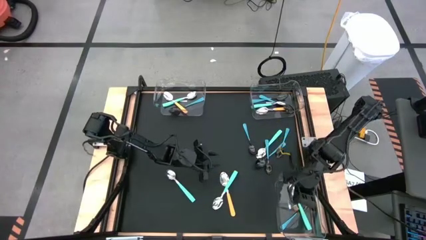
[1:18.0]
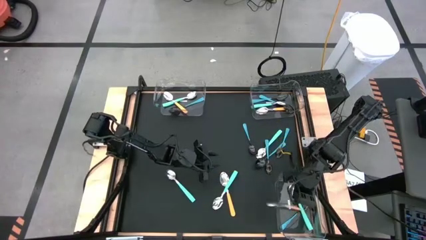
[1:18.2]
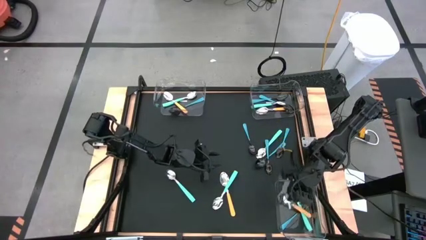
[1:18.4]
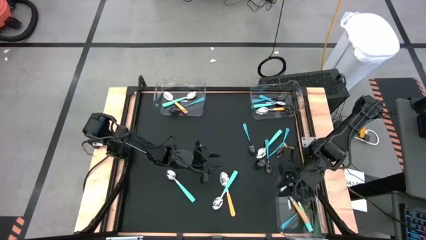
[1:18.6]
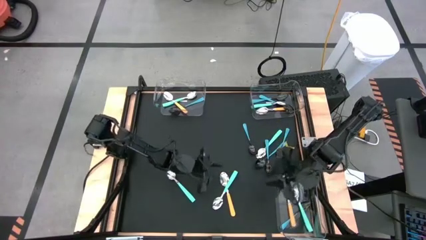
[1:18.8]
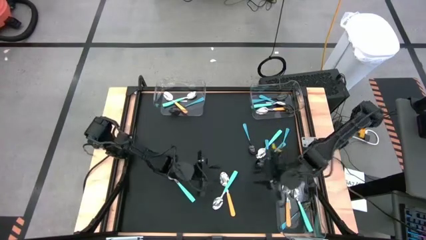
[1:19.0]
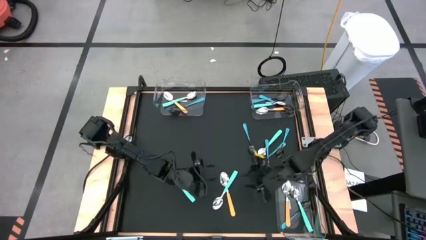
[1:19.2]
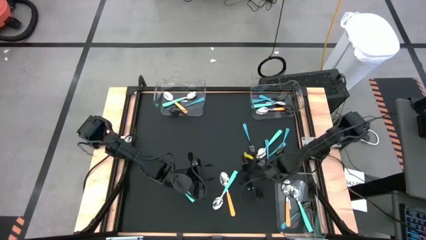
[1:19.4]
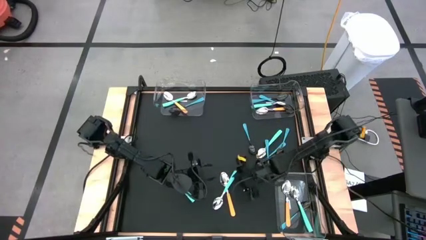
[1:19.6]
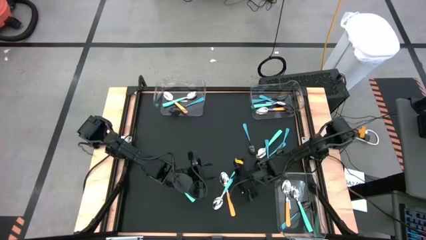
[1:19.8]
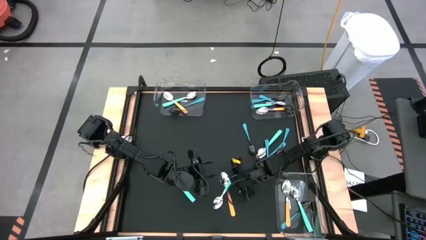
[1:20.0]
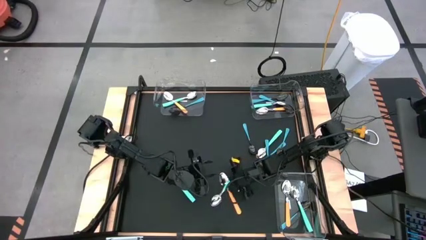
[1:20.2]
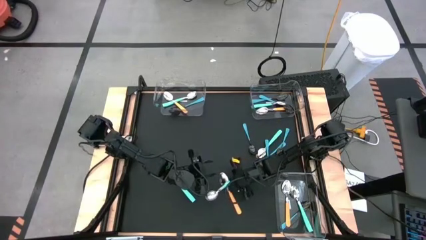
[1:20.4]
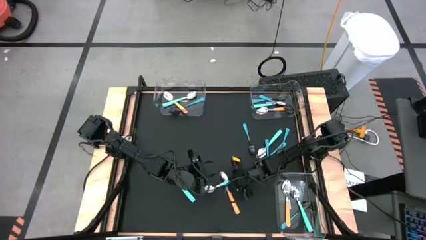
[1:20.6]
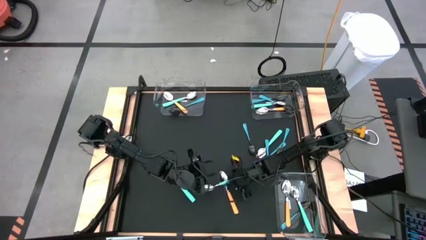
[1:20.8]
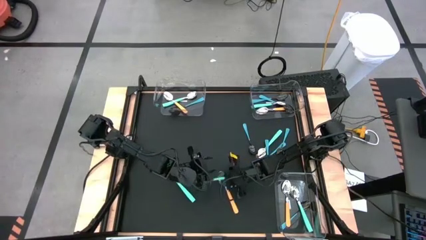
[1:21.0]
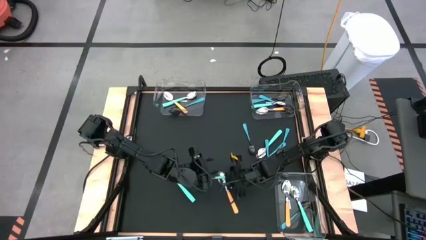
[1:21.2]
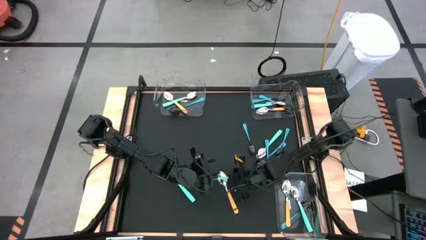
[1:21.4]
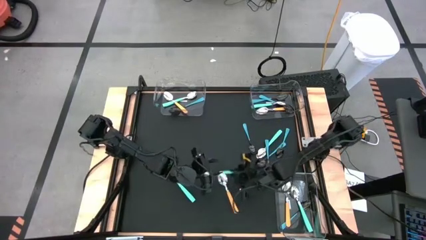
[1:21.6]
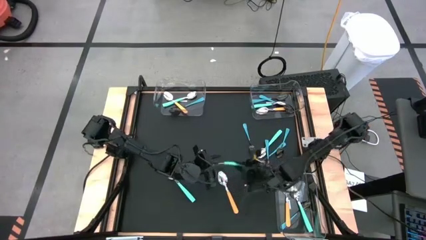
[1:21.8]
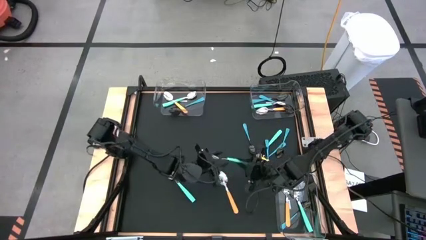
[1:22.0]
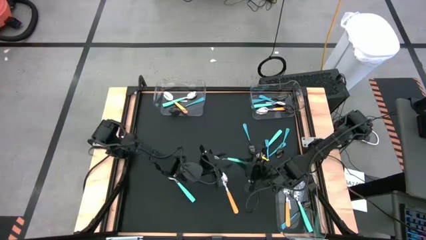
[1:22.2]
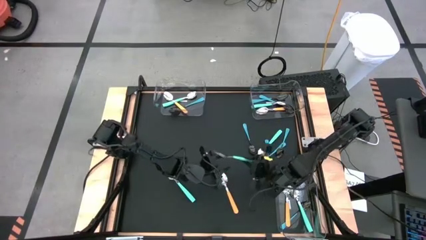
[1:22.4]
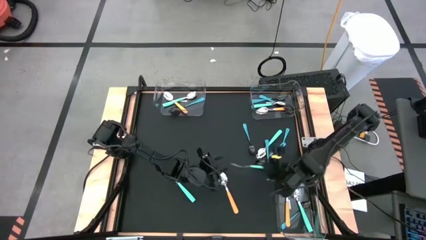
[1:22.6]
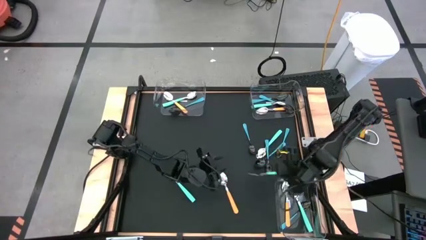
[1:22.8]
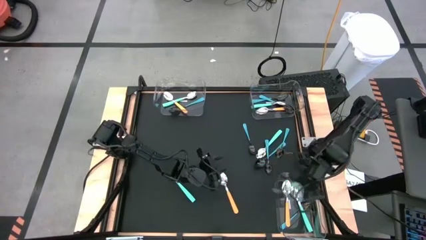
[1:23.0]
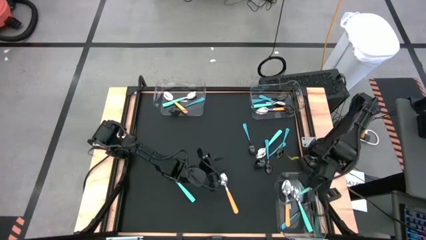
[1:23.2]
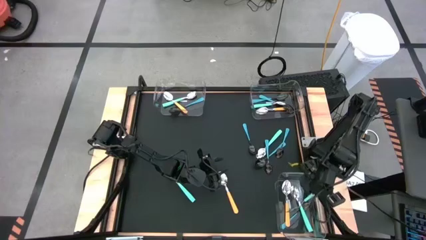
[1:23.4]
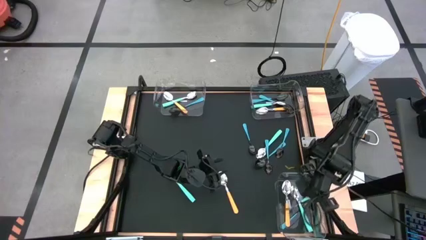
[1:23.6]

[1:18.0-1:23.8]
Task: Sort silverware by color (type)
Put the light blue spoon into the bottom transparent bin

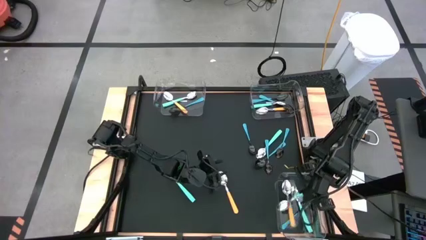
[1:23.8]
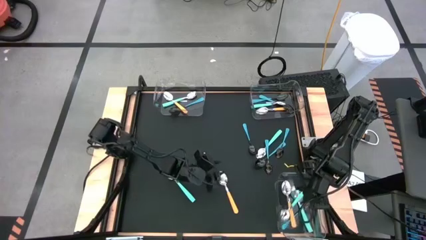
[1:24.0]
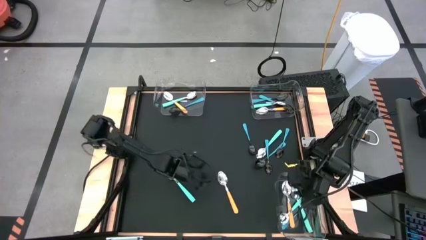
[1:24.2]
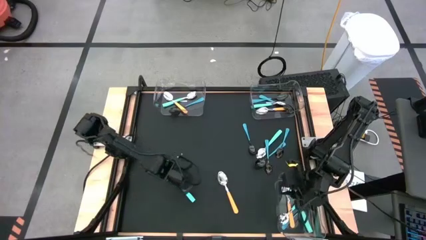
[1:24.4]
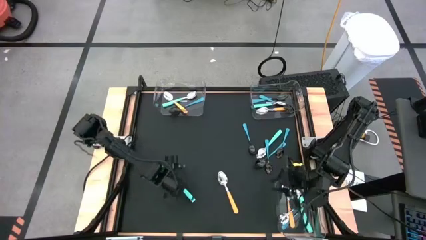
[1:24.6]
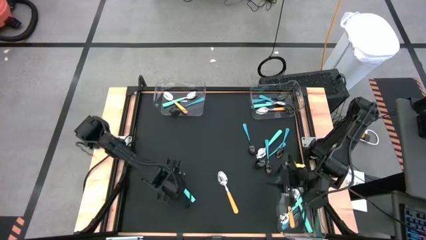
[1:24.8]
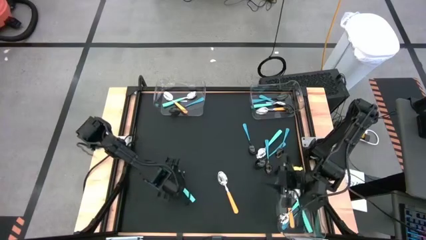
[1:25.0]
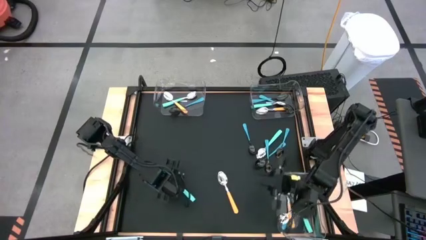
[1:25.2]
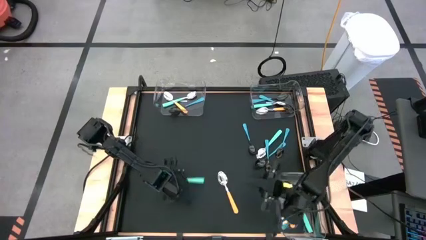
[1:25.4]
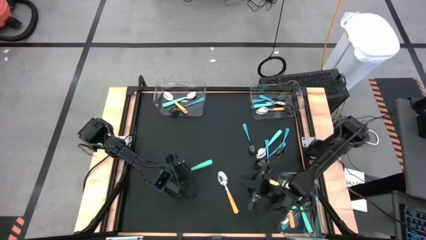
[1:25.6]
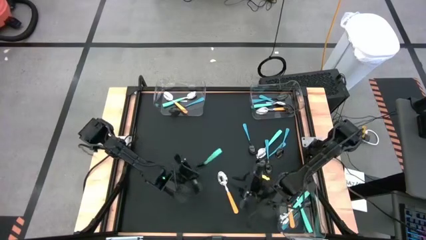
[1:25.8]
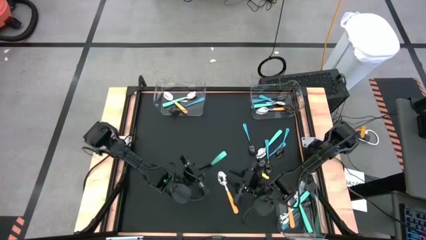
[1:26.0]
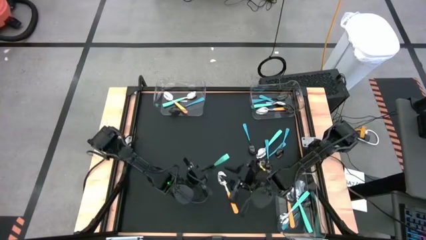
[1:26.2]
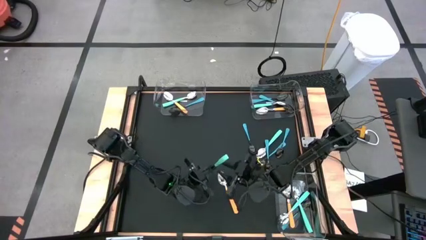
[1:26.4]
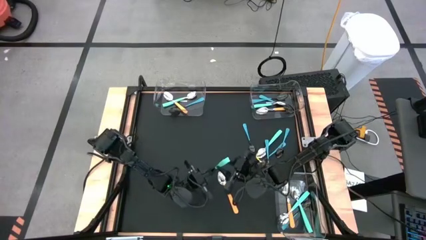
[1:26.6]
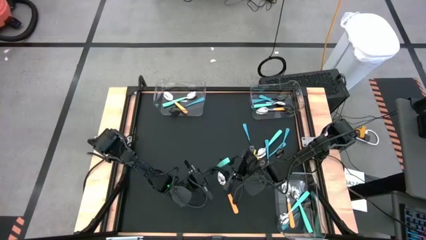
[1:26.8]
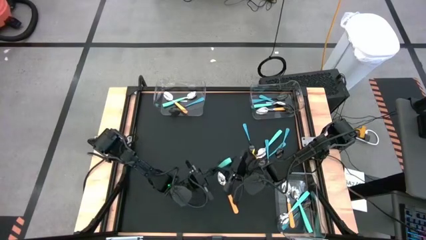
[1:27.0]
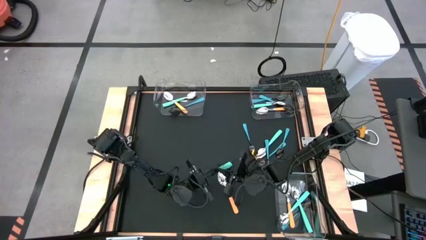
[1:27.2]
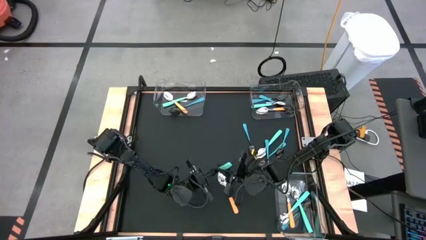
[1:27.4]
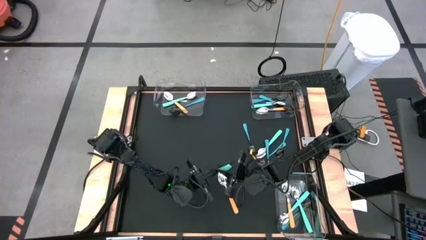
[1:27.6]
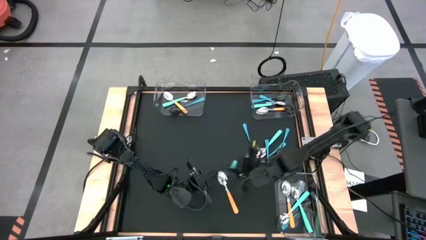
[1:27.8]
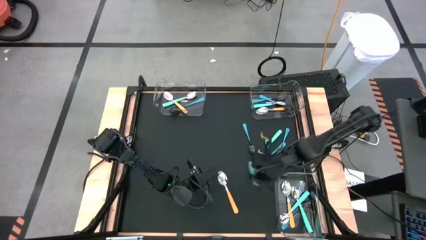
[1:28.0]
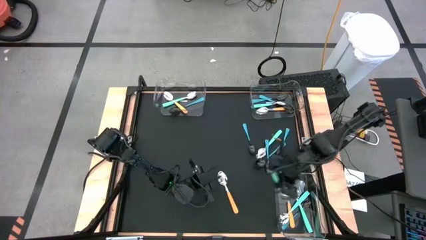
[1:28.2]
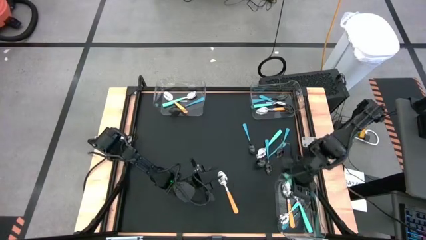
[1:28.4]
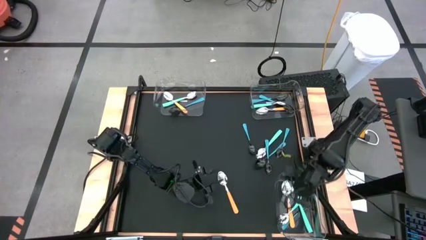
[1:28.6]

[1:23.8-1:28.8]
Put the light blue spoon into the bottom transparent bin

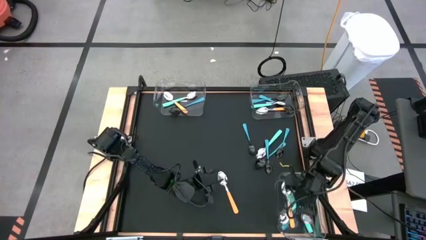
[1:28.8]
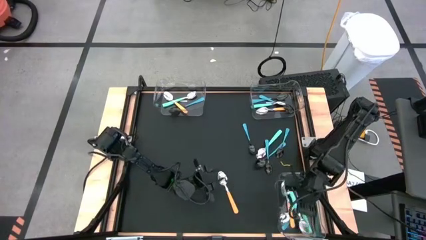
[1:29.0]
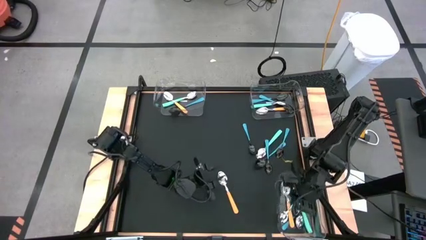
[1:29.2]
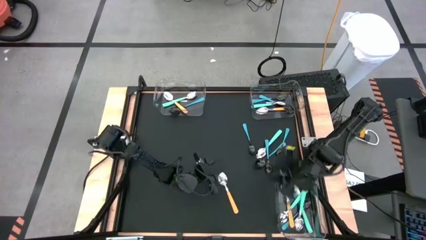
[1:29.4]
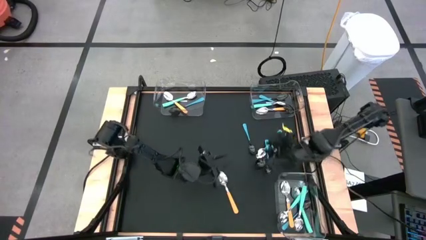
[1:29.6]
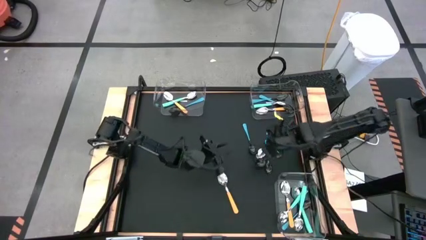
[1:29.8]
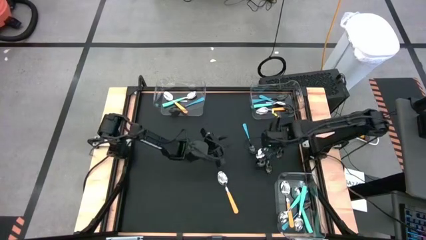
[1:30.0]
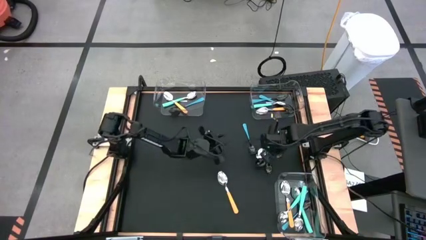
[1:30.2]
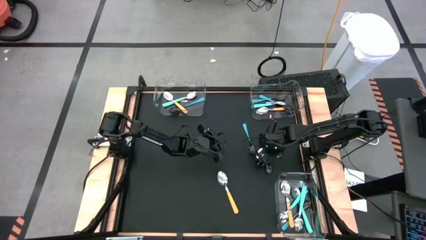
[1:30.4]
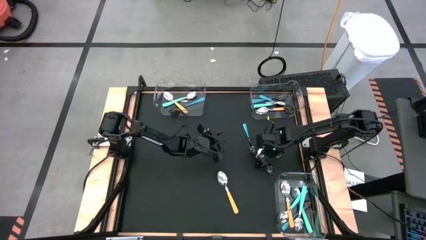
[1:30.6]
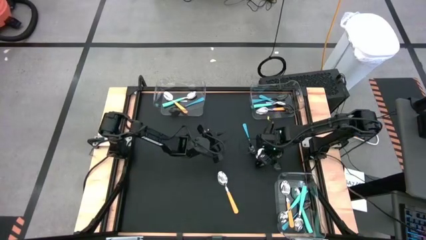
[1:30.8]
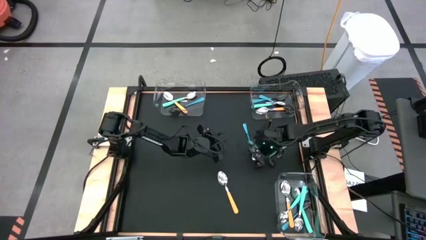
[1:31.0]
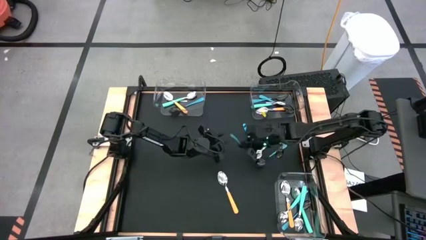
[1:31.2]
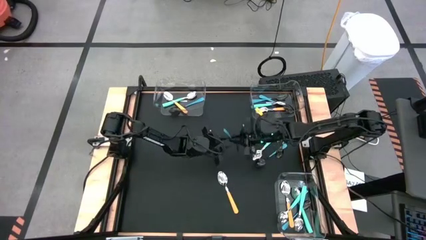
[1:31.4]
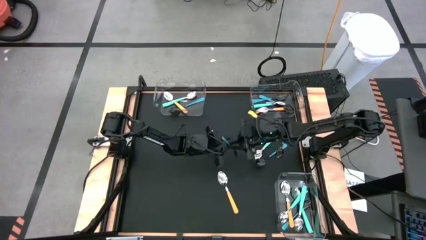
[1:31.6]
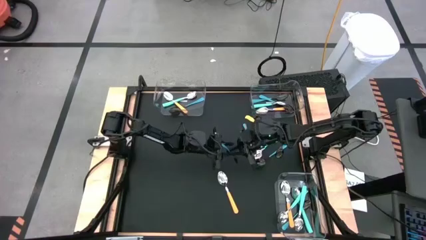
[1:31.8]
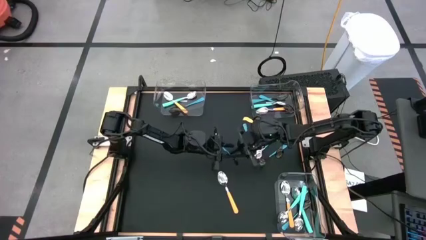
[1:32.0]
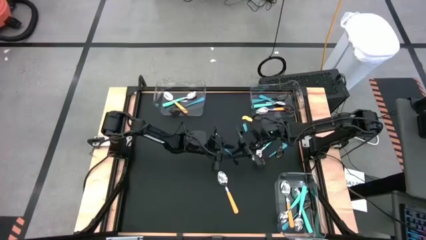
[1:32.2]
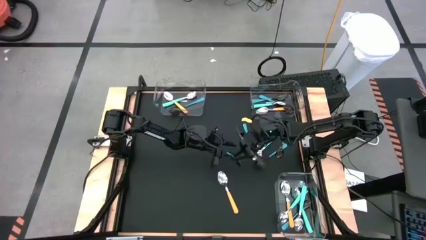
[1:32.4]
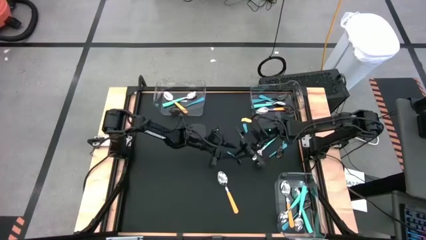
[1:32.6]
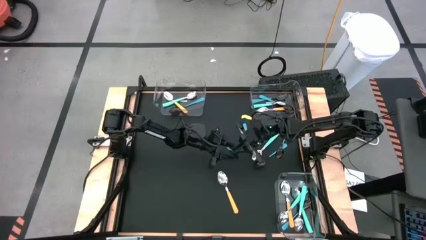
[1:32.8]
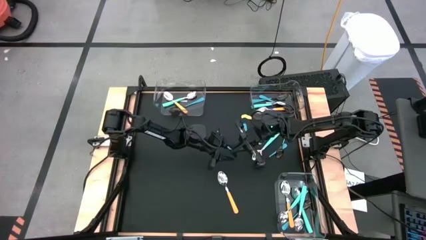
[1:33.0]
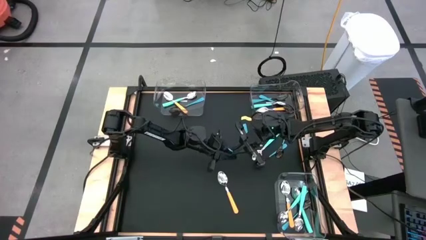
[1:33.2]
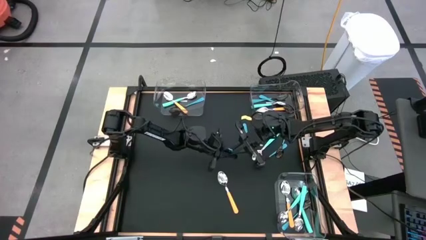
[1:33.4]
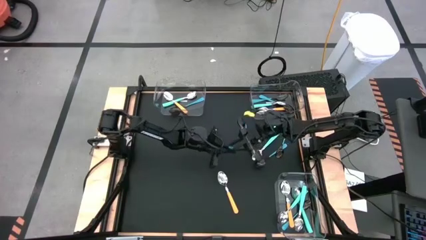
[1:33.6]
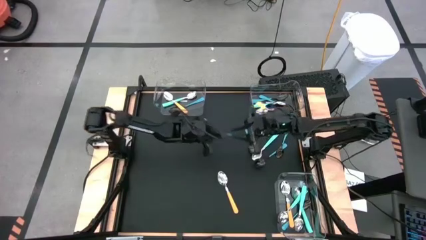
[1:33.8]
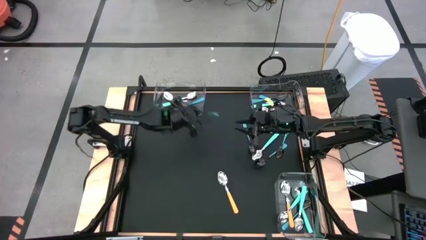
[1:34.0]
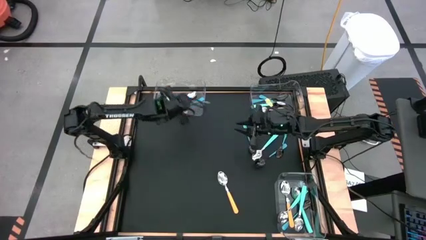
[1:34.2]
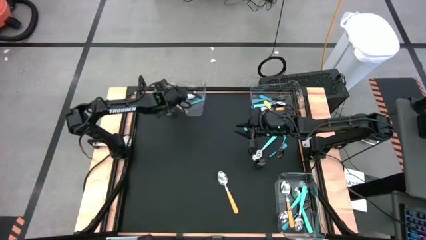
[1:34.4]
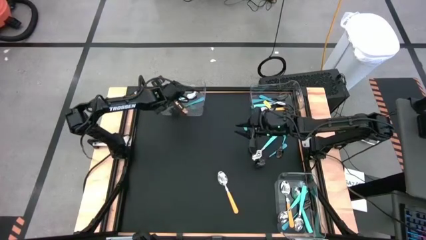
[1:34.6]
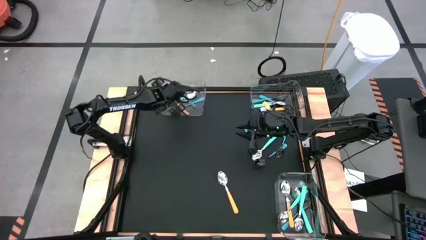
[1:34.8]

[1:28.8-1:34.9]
Put the blue spoon into the top left transparent bin
